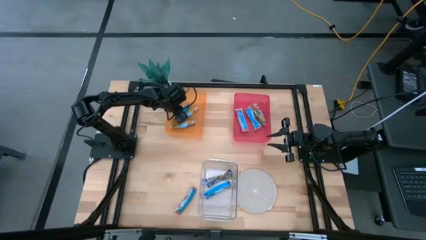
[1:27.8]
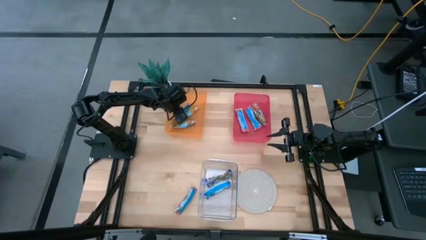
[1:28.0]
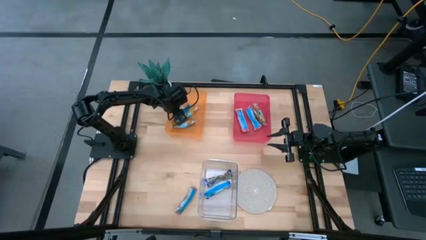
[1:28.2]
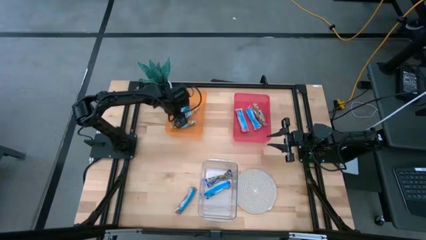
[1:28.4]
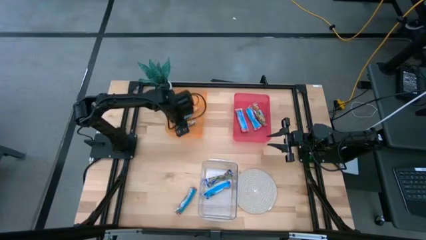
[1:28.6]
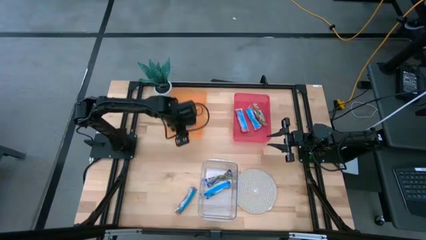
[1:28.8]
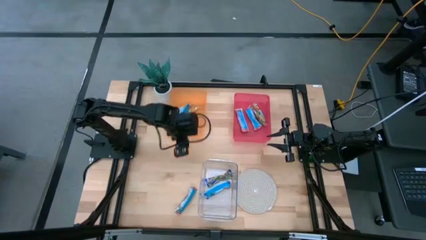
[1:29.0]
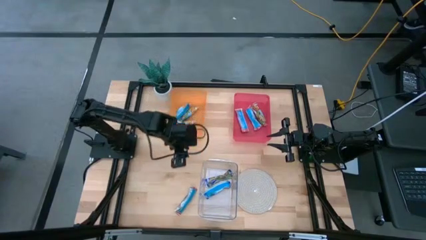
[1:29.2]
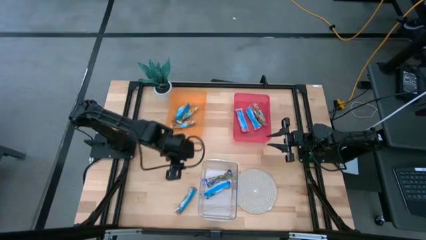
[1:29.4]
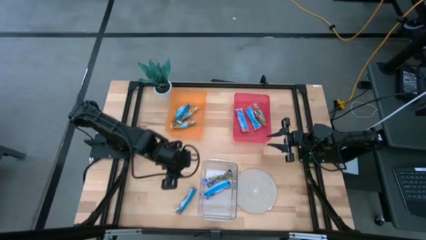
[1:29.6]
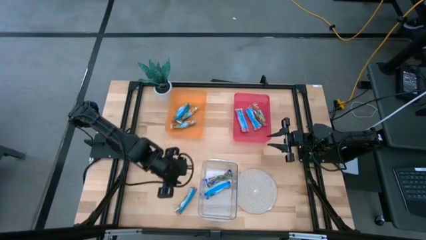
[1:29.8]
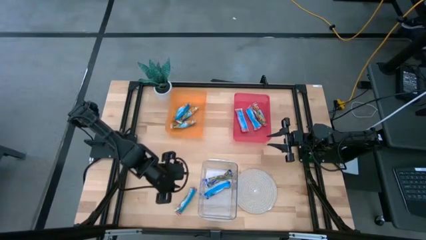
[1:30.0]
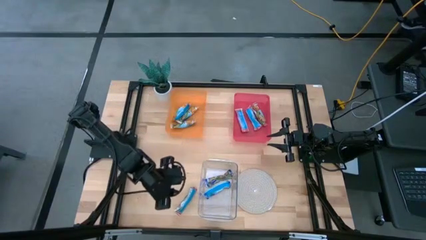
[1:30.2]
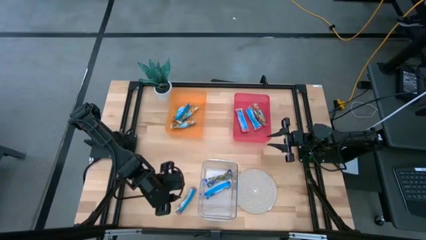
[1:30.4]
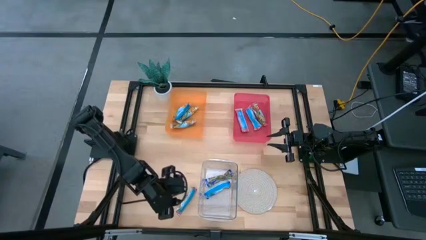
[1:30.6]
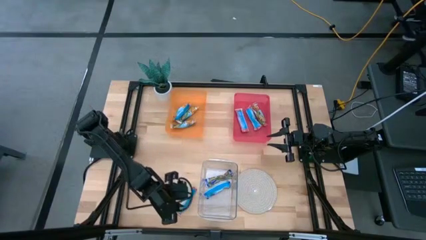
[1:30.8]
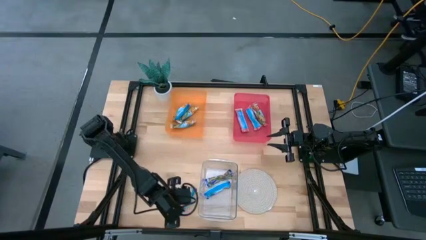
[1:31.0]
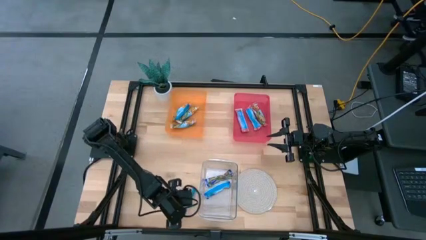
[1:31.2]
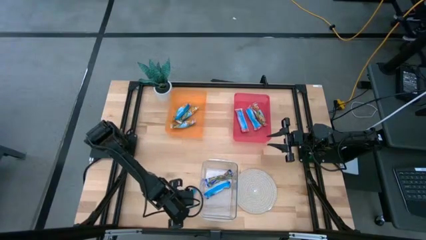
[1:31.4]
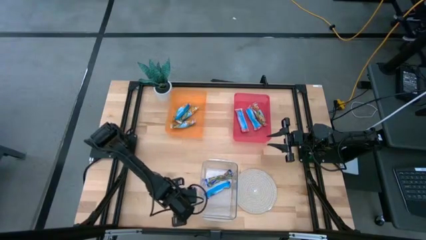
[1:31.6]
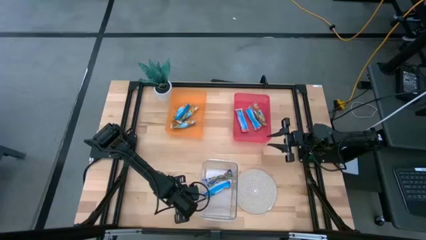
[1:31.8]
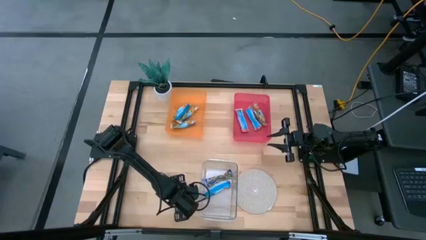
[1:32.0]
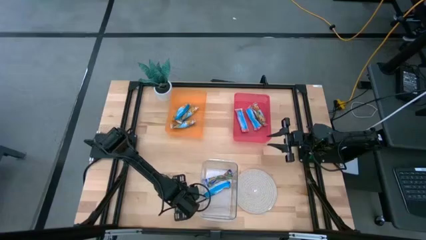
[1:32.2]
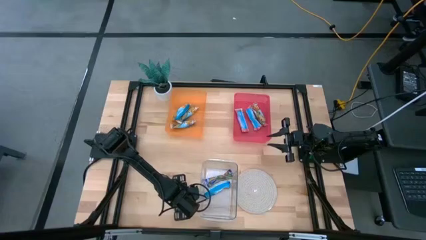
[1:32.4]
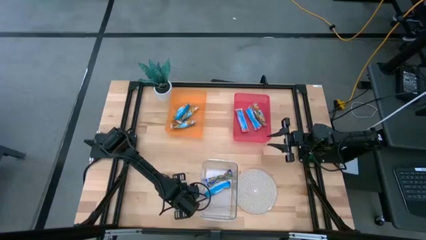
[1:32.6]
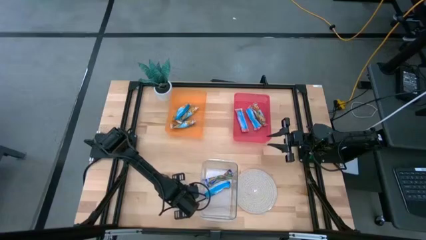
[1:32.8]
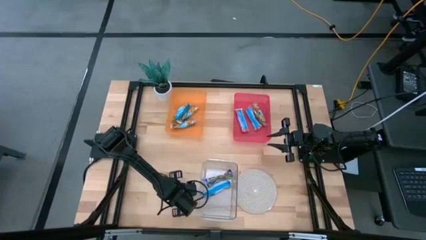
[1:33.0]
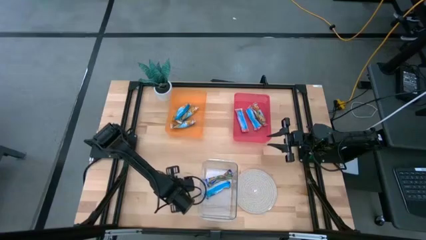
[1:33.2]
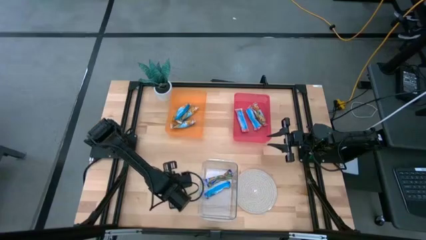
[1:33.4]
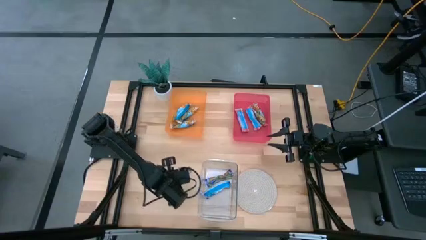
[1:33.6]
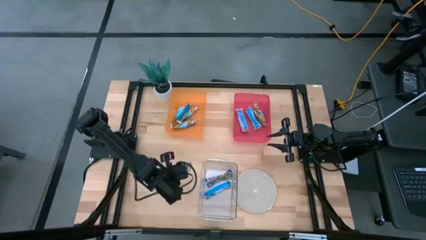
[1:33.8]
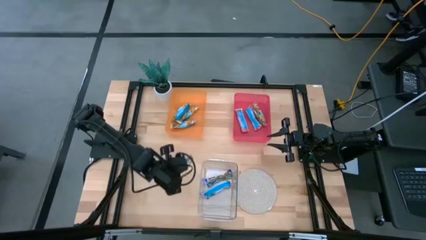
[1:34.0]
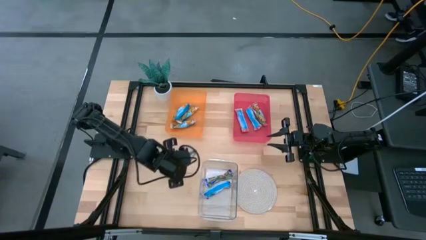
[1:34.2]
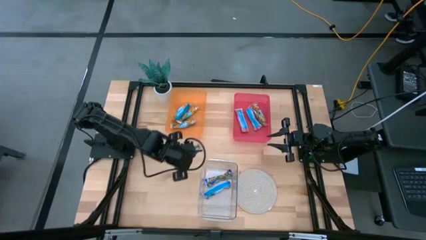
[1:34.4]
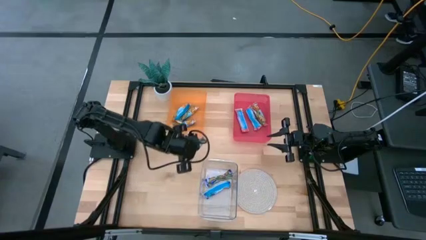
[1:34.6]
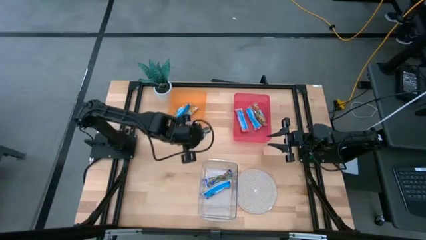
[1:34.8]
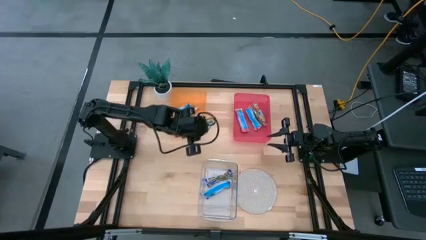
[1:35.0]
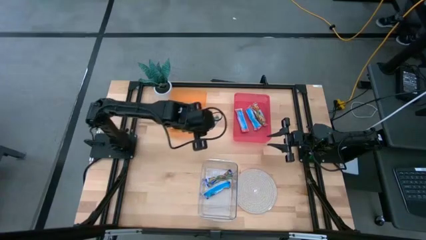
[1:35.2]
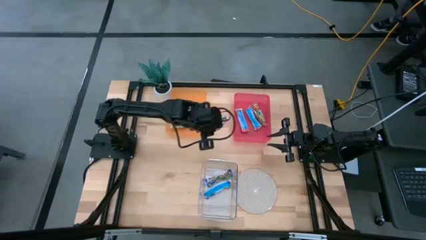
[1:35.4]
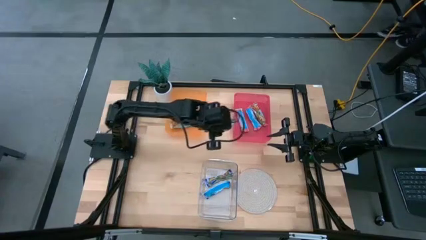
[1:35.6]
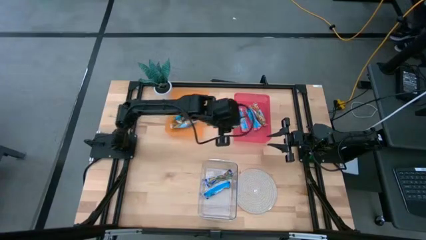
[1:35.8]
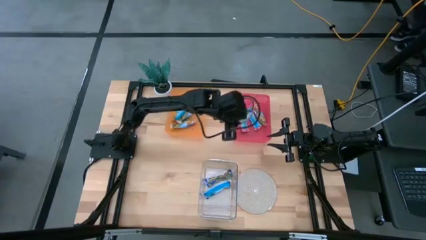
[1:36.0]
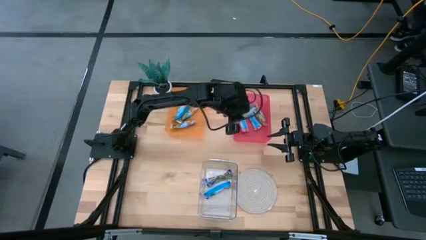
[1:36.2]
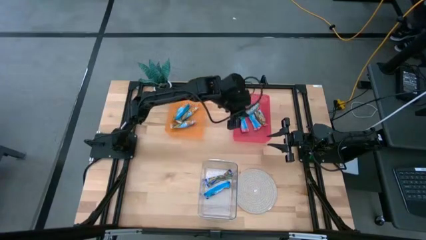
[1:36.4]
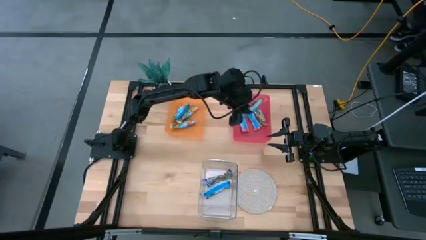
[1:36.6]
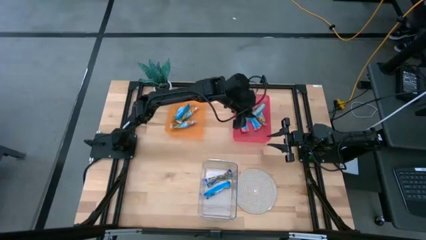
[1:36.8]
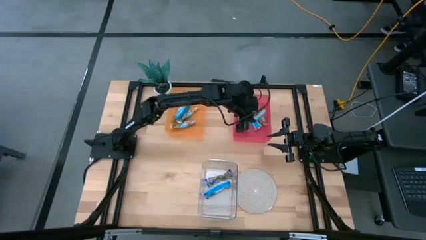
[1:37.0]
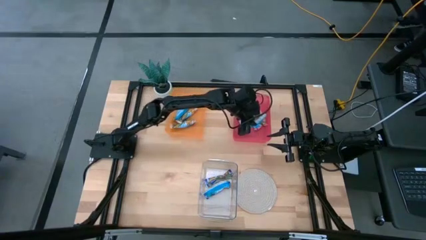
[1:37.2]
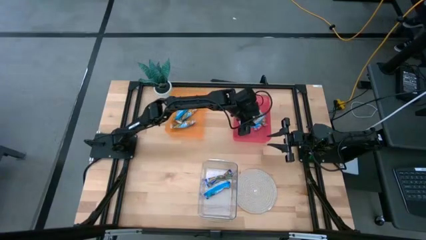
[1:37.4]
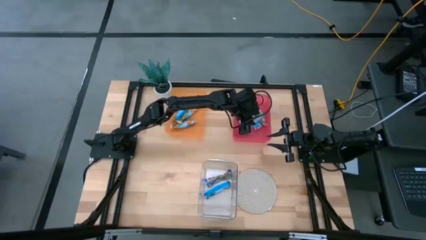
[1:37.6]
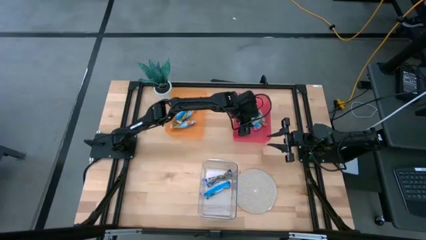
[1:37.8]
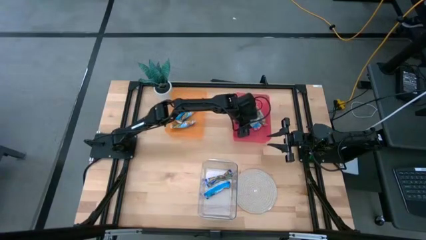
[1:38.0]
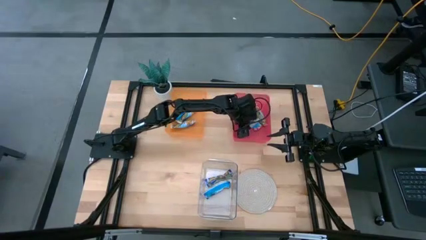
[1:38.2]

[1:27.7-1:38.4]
Task: Pick and place Granola Bars by type
Put the red granola bar into the red bin

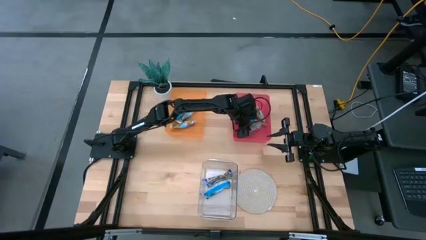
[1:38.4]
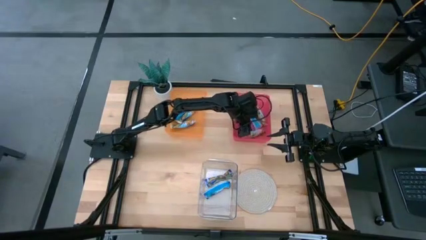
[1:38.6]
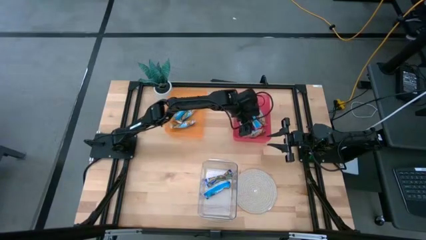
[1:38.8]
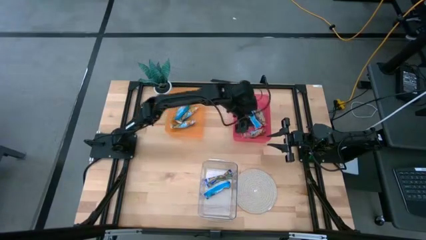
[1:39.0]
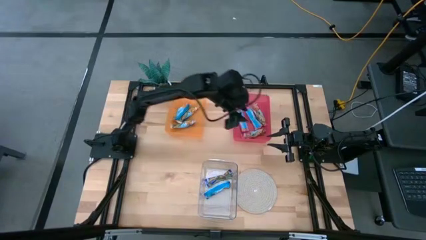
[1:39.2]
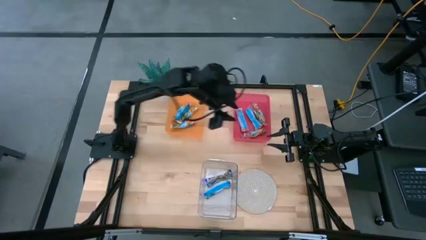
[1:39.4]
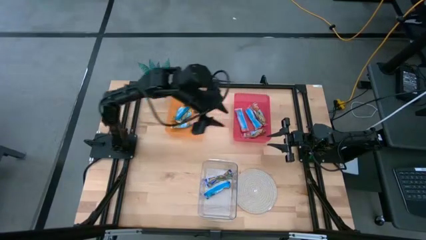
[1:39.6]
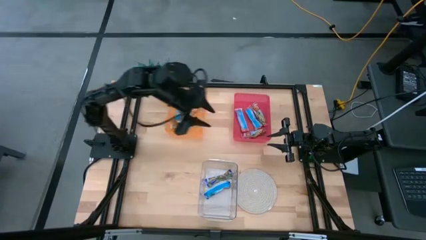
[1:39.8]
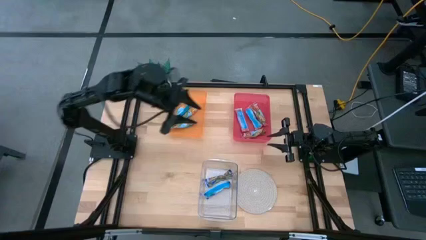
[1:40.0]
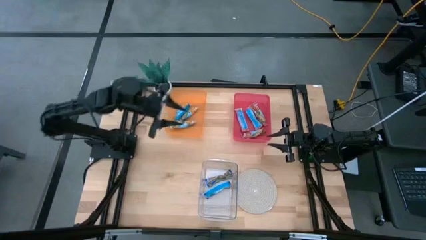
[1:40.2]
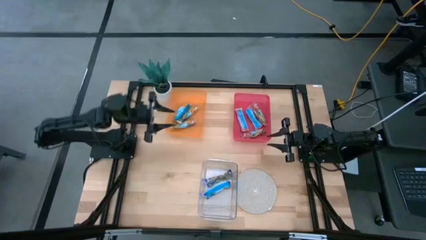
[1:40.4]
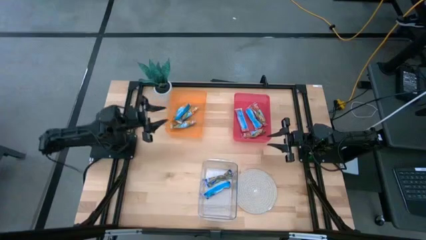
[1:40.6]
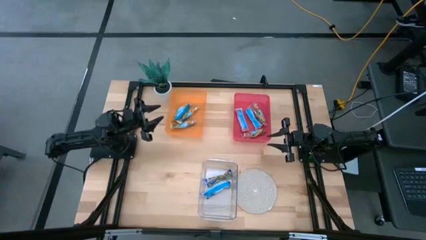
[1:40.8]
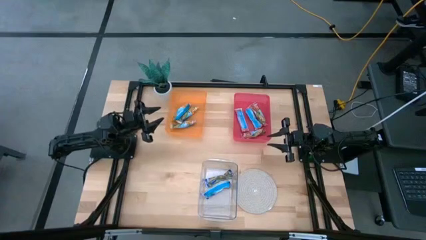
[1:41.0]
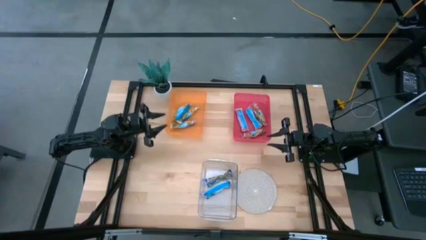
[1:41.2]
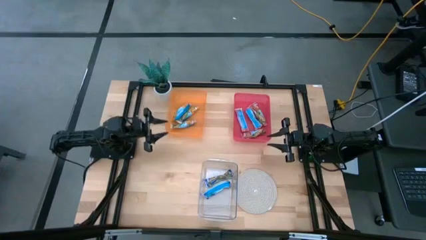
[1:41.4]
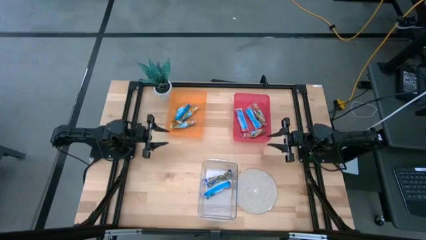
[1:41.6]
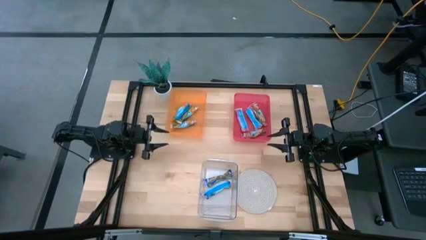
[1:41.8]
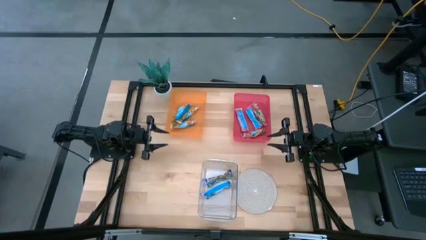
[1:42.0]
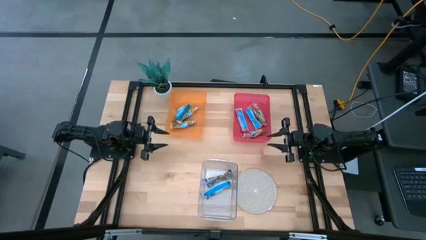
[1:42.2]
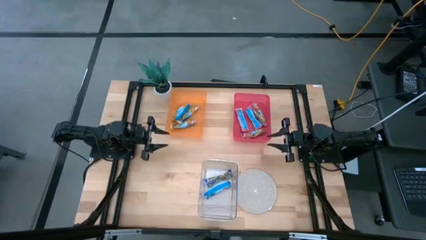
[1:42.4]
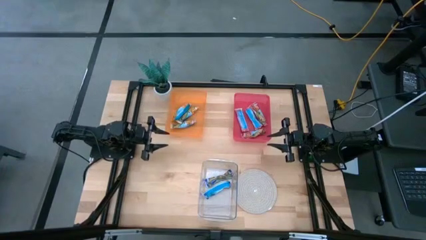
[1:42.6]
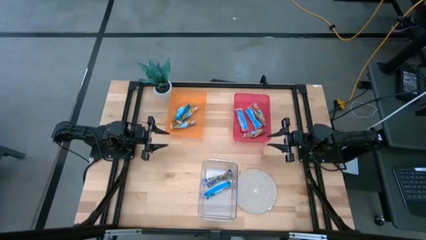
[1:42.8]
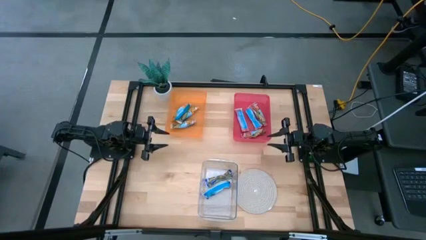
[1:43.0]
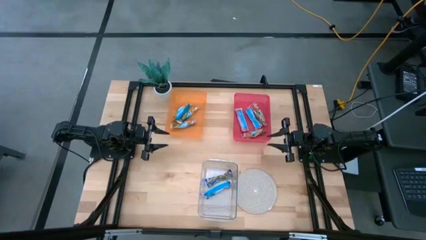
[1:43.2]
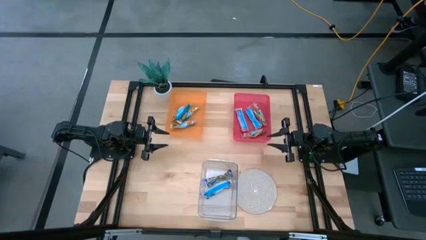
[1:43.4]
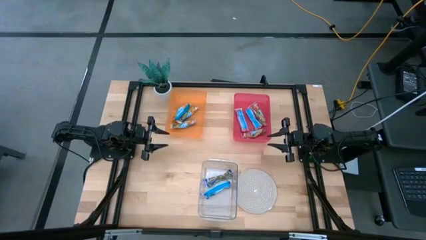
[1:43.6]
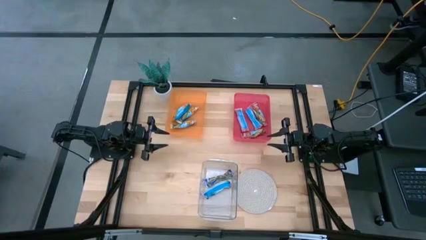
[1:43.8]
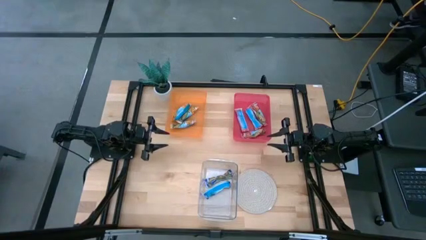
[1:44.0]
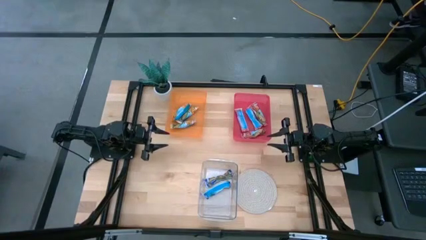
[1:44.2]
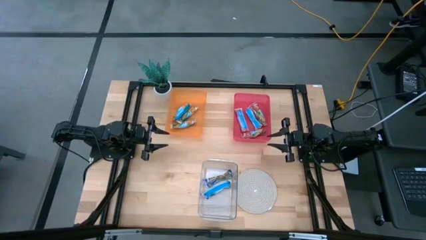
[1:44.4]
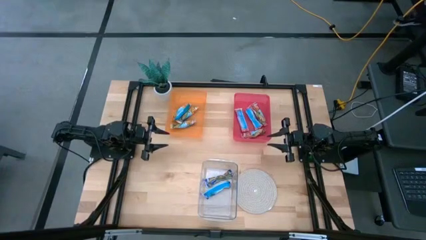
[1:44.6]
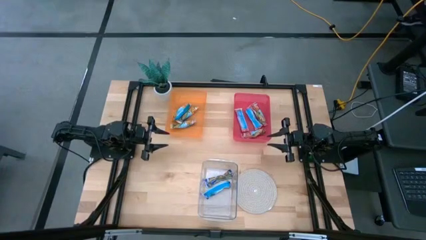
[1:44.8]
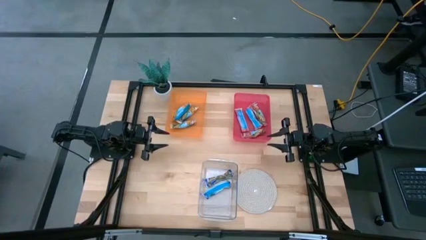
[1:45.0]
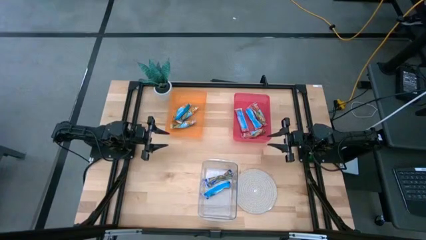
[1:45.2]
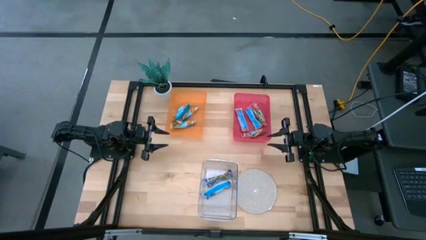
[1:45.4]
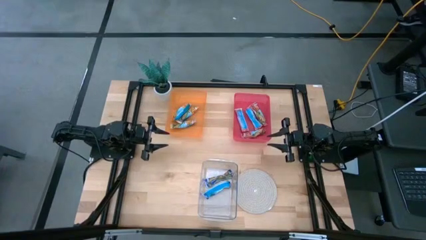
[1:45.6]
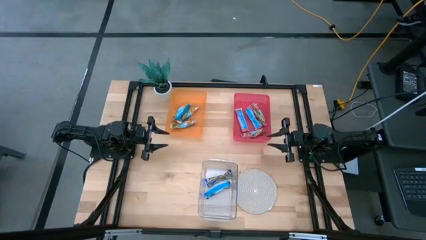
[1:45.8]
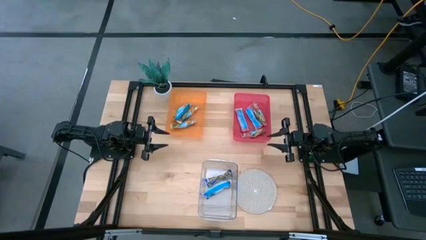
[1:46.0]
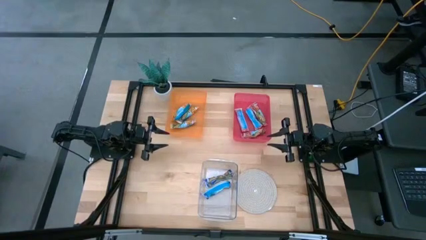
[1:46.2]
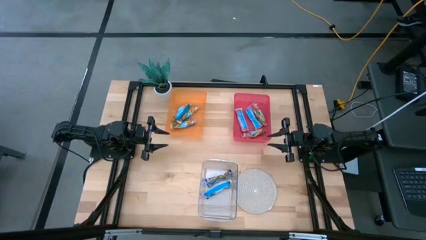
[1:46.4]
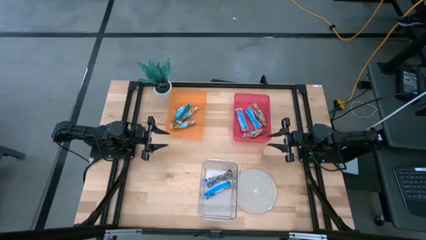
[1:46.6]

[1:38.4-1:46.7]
Return to Home Position
